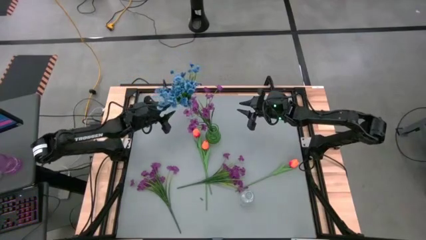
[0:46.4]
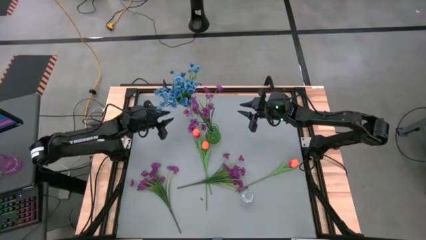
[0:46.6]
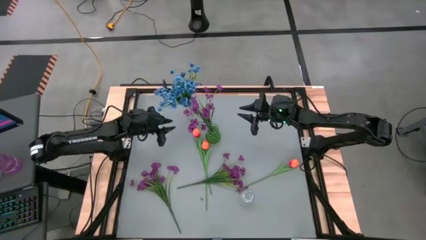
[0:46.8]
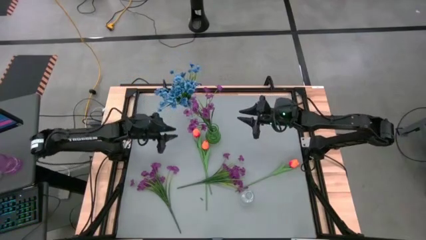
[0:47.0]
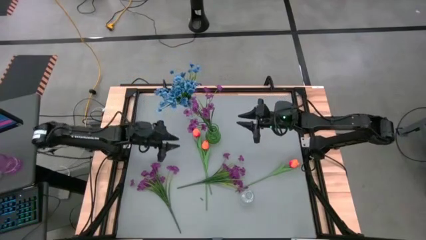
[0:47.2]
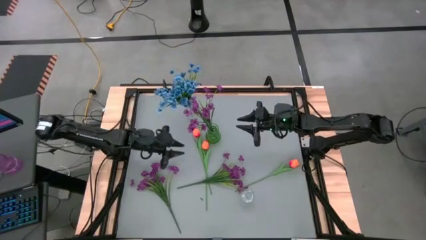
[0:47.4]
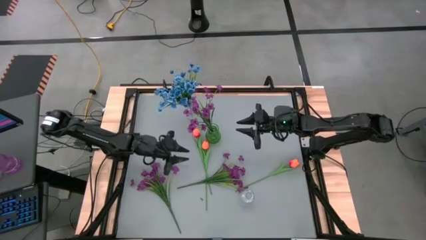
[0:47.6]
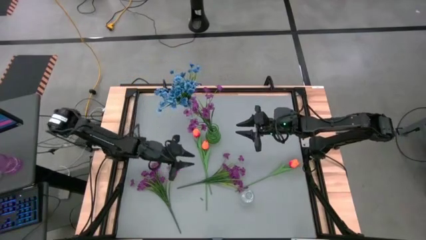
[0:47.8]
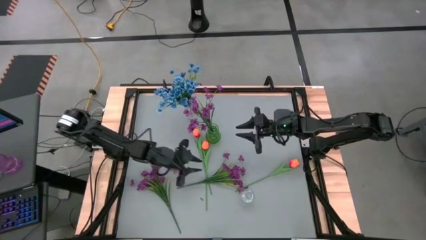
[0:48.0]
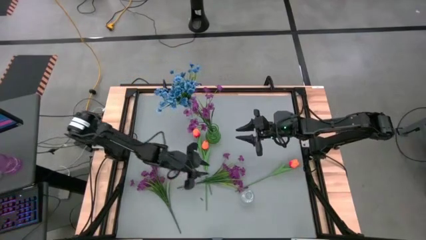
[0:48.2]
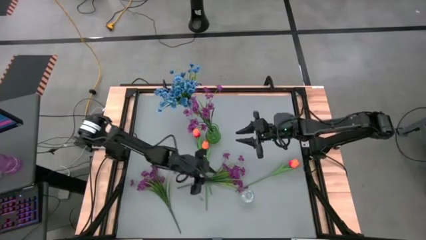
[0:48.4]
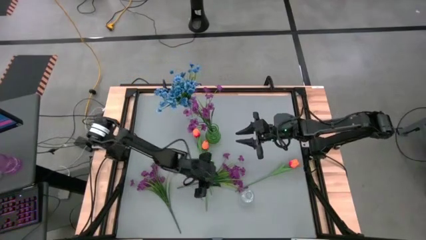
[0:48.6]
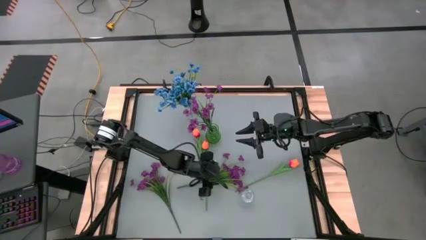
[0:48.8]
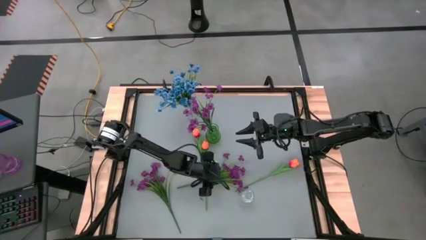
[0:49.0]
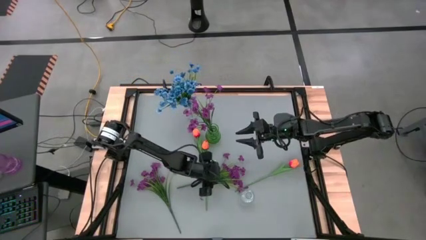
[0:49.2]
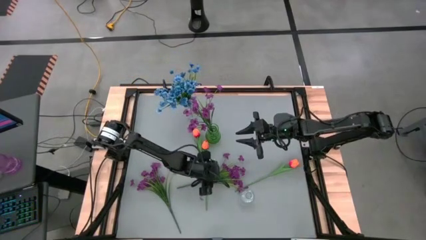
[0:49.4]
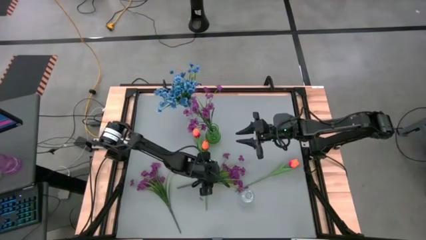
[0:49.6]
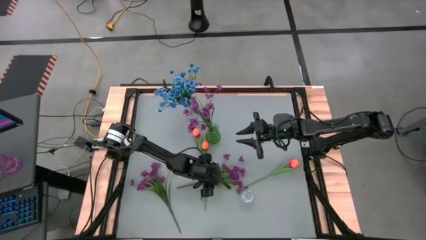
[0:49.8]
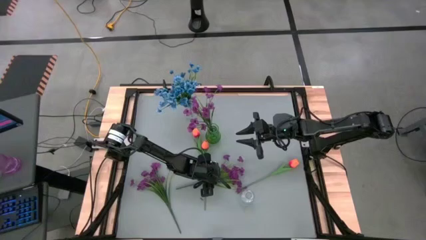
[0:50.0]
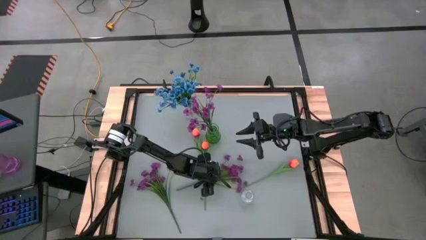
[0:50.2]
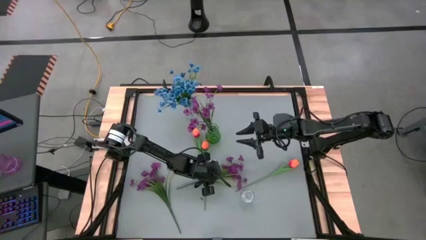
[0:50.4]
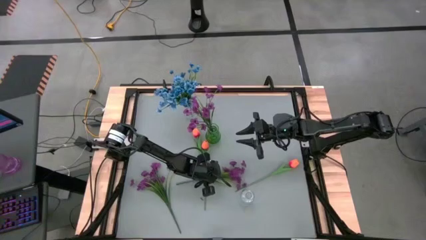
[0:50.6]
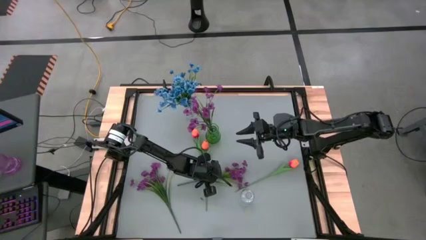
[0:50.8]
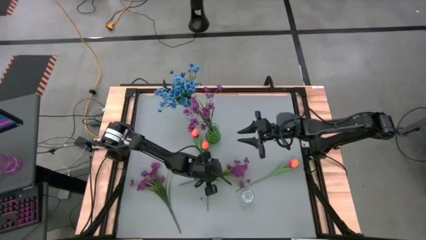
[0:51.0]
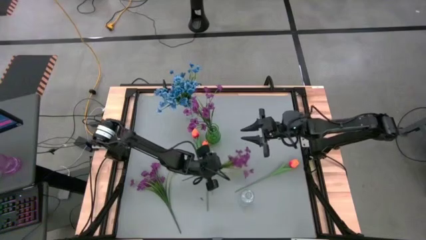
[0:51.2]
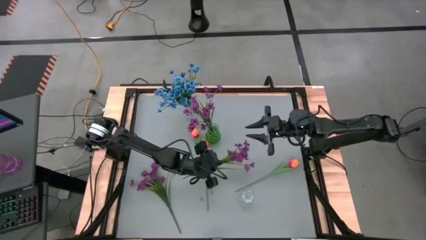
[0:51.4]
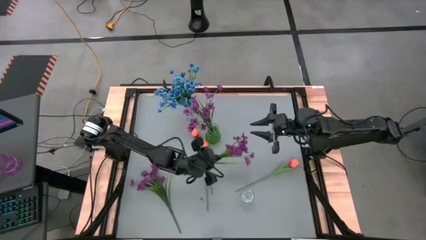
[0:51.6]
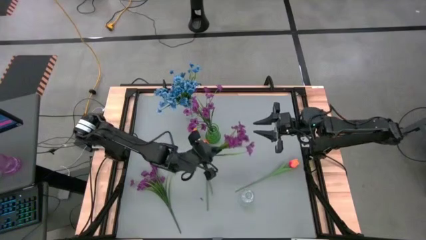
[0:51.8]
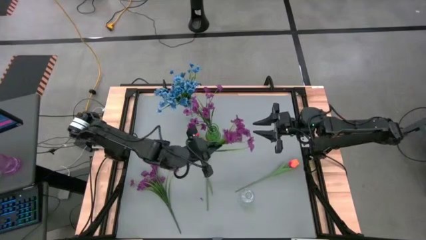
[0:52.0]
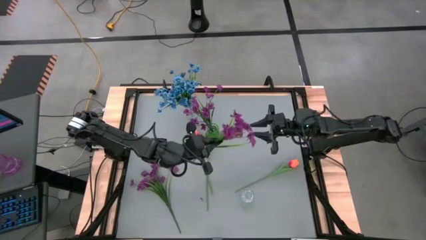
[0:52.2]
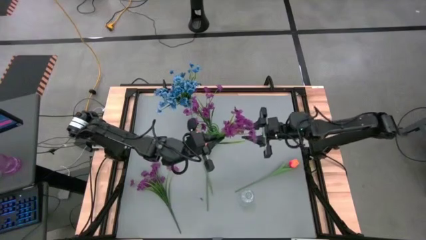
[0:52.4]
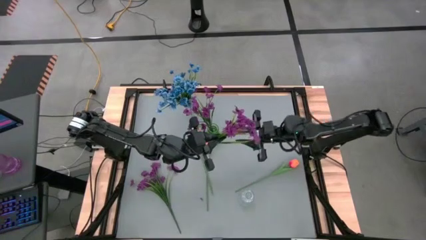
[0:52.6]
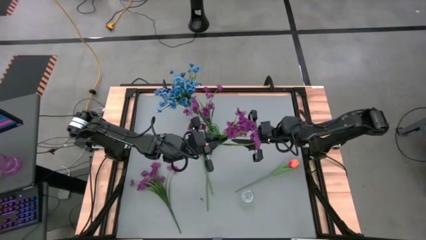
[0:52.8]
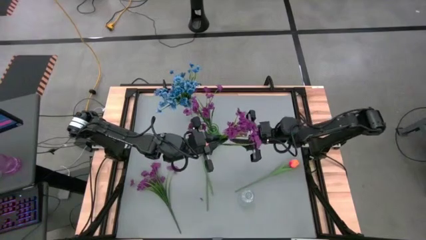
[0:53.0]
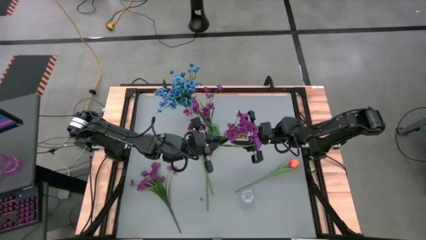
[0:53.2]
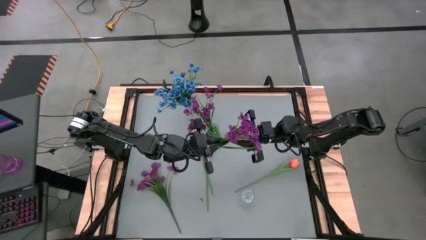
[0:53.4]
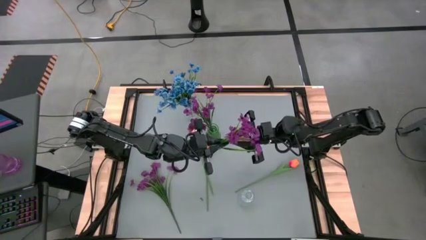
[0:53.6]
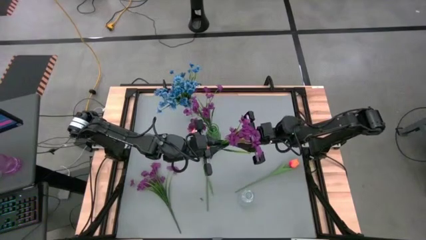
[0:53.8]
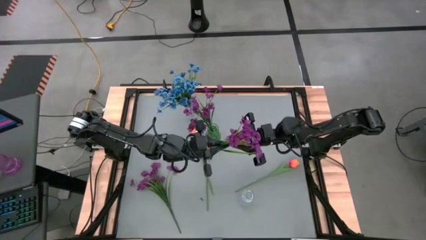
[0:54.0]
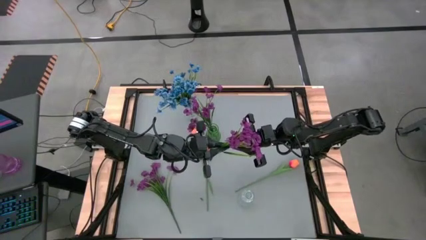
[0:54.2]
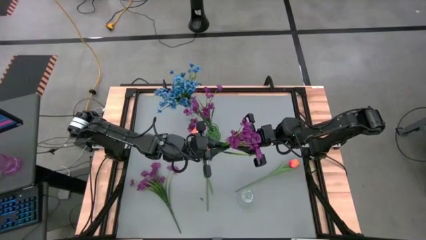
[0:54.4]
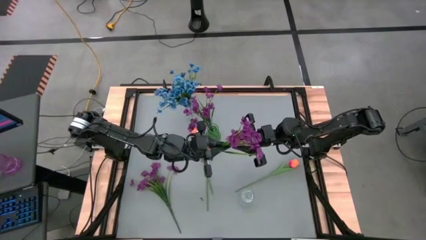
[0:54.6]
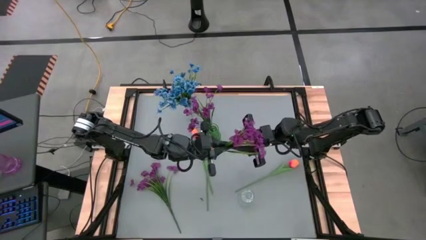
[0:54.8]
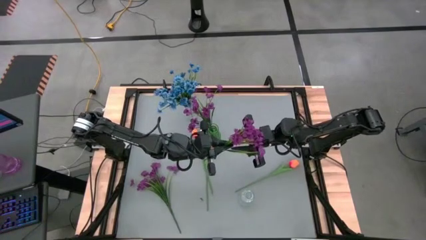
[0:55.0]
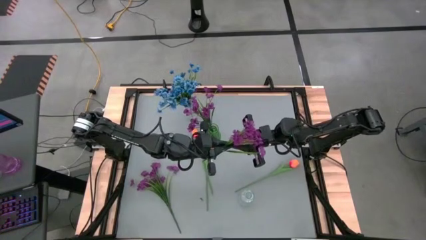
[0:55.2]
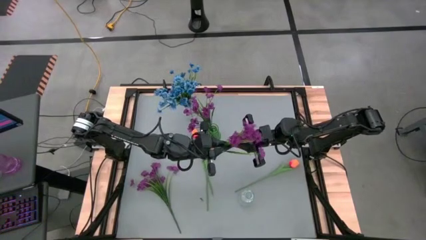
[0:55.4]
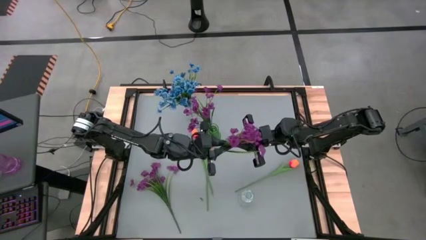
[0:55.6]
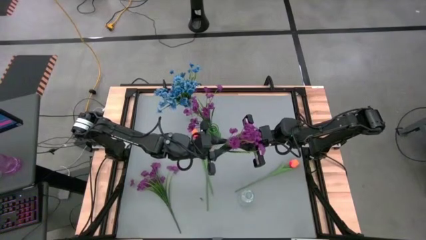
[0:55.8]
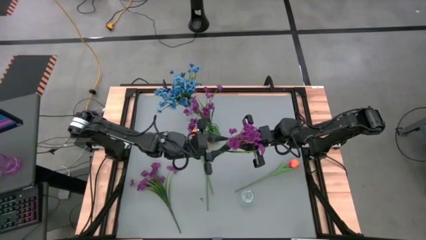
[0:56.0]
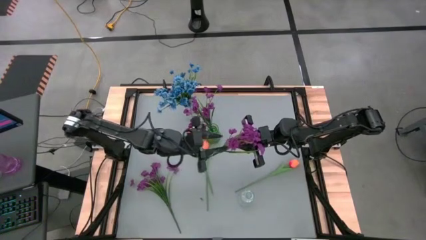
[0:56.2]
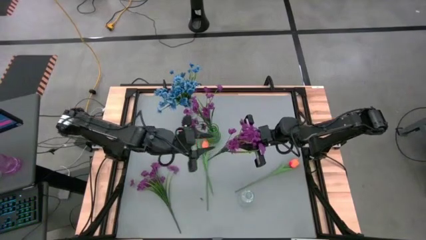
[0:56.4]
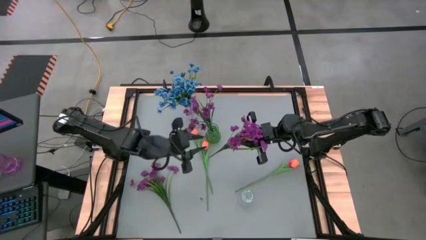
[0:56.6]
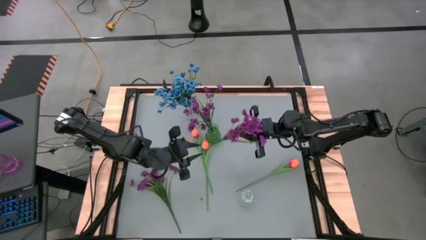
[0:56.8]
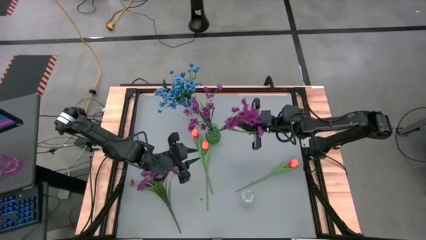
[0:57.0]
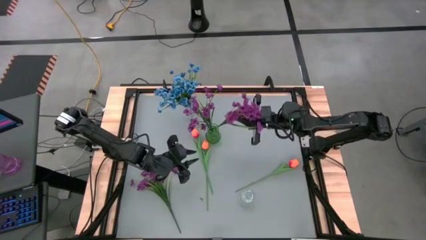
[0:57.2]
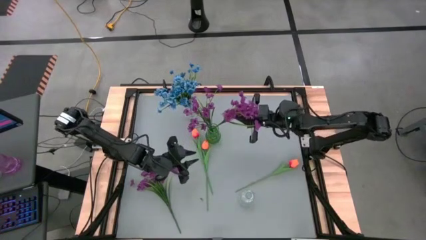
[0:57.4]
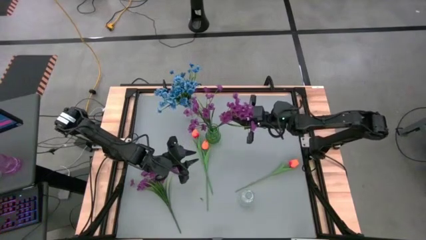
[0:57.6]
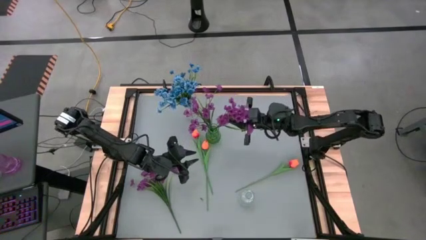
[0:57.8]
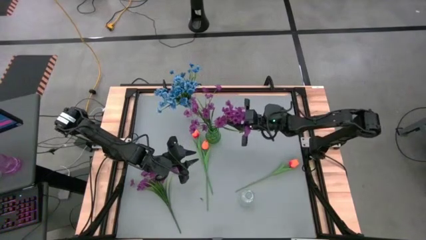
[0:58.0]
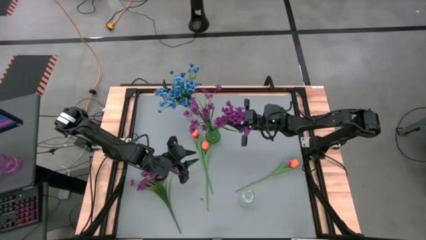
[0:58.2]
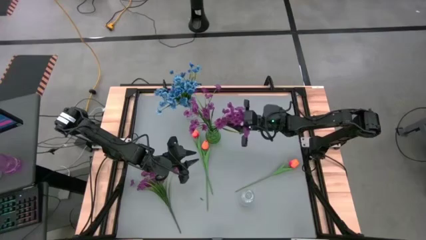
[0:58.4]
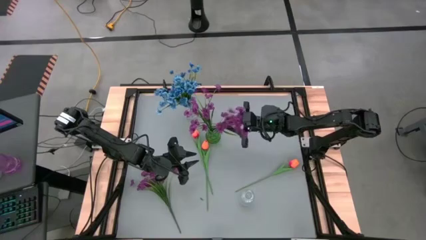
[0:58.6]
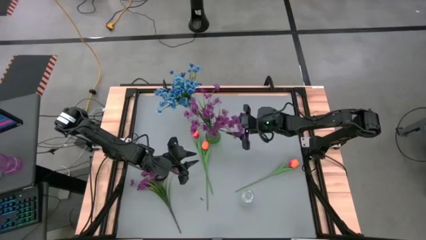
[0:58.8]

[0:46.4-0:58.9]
Task: Sort flowers into vase by color
Put the right violet flowers into the green vase
